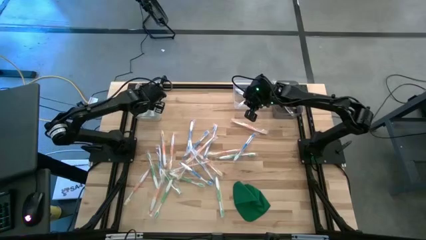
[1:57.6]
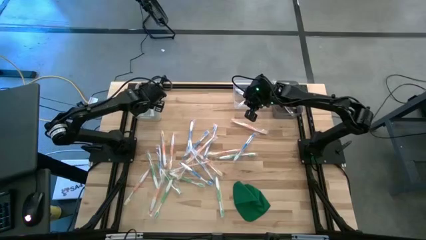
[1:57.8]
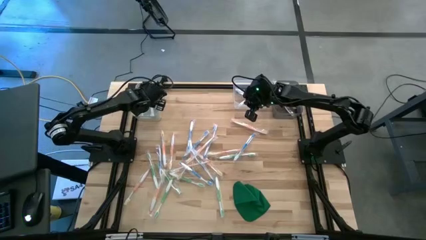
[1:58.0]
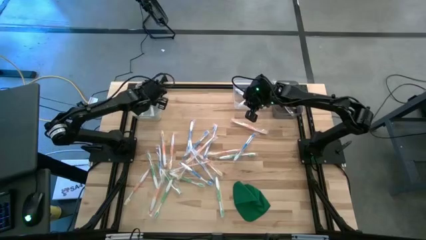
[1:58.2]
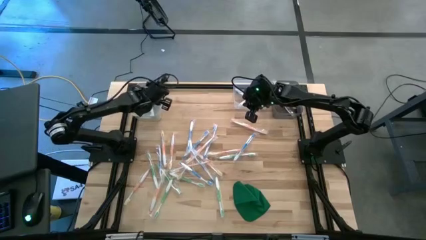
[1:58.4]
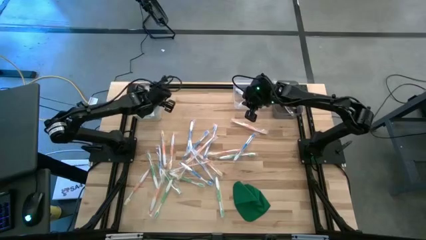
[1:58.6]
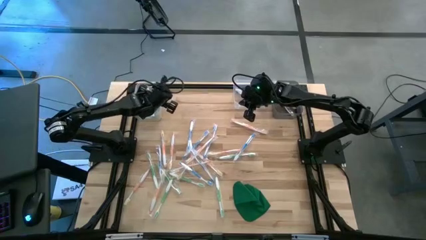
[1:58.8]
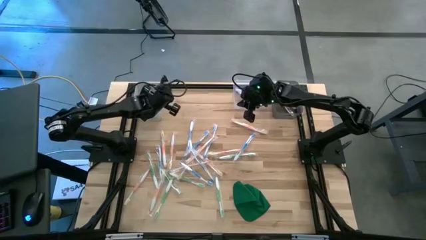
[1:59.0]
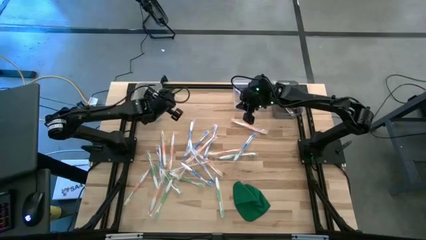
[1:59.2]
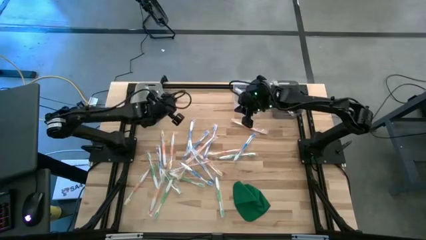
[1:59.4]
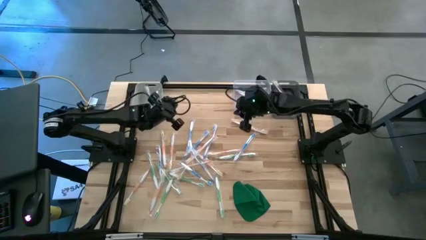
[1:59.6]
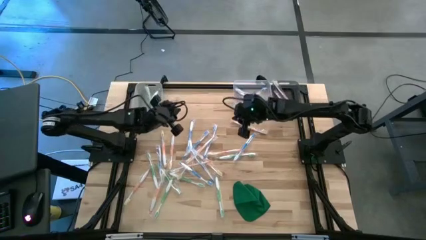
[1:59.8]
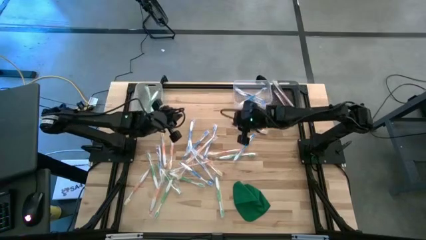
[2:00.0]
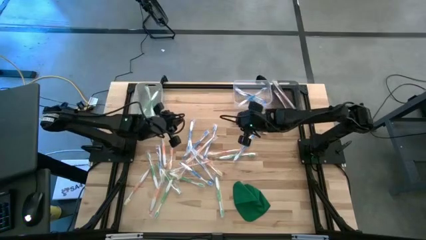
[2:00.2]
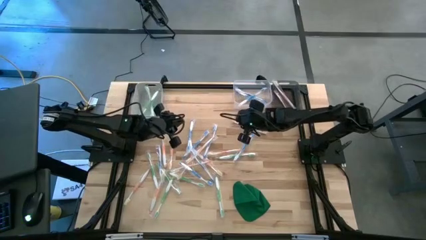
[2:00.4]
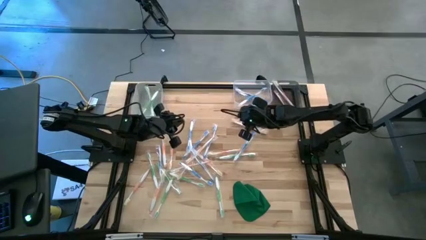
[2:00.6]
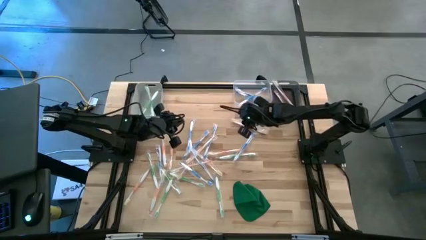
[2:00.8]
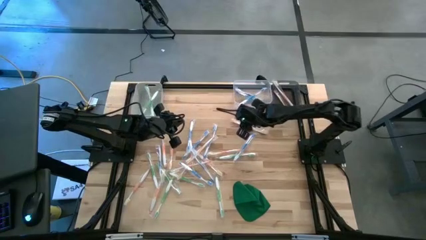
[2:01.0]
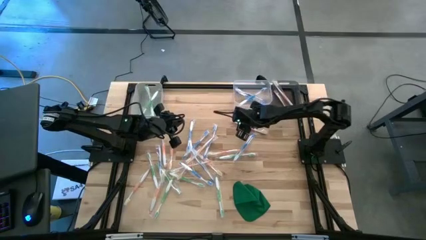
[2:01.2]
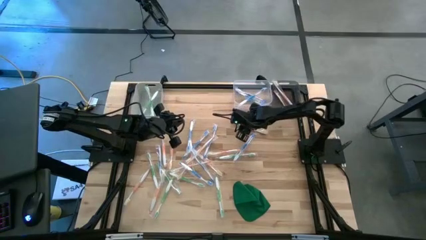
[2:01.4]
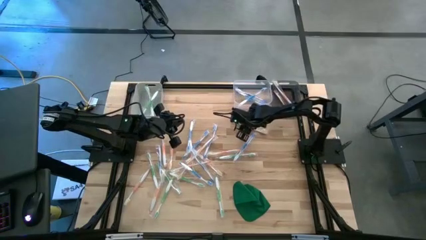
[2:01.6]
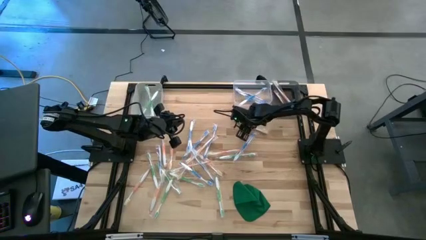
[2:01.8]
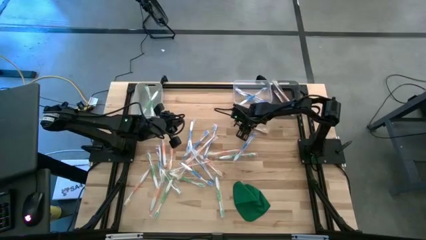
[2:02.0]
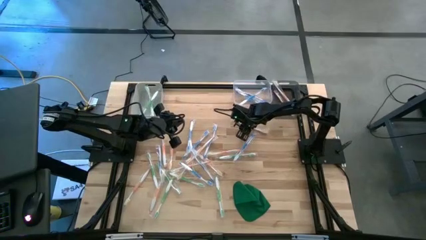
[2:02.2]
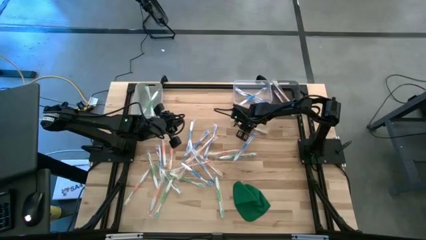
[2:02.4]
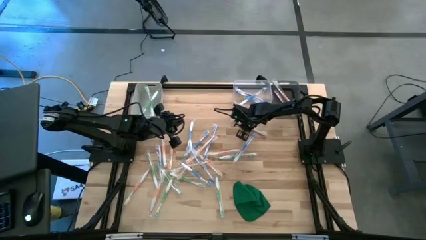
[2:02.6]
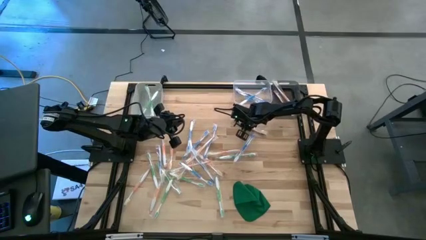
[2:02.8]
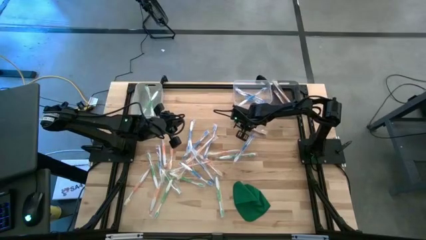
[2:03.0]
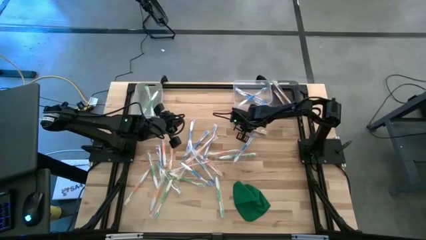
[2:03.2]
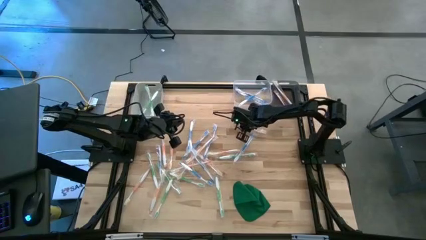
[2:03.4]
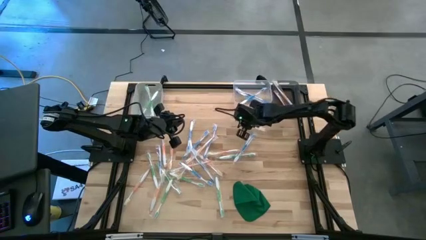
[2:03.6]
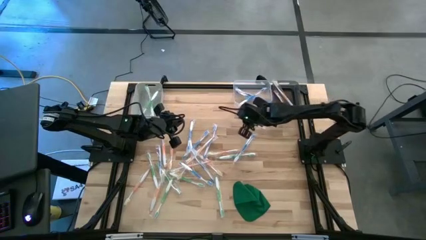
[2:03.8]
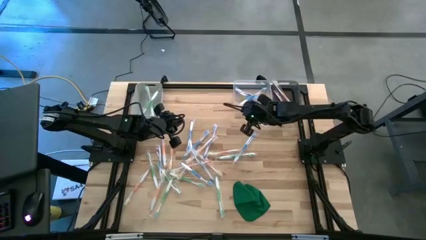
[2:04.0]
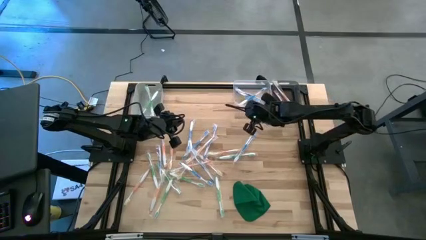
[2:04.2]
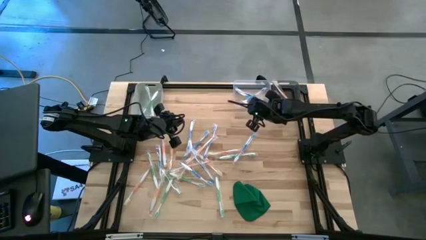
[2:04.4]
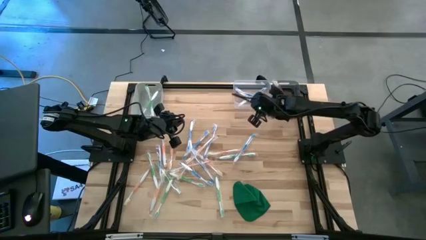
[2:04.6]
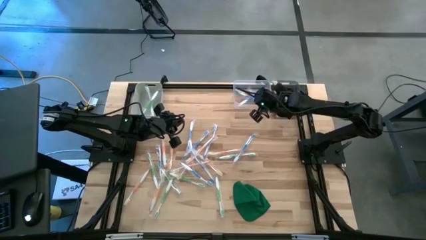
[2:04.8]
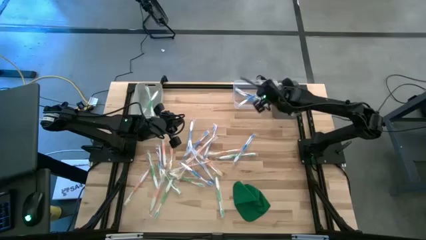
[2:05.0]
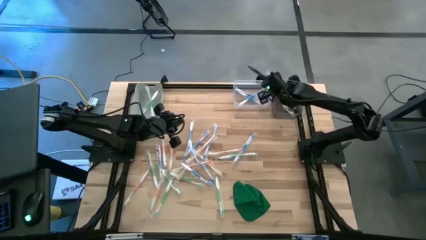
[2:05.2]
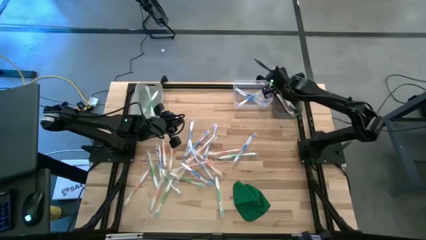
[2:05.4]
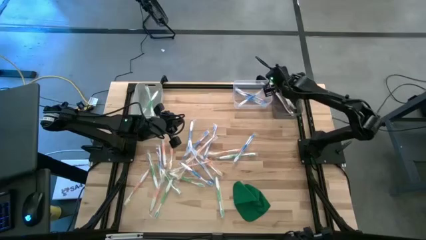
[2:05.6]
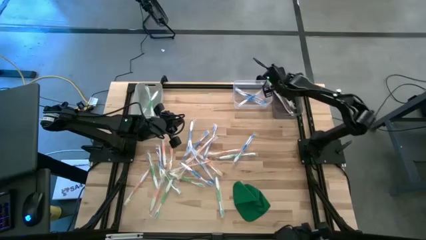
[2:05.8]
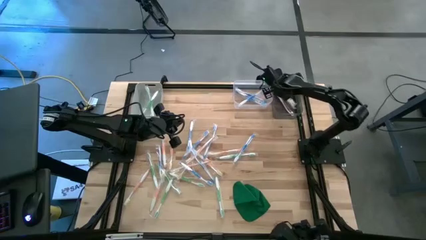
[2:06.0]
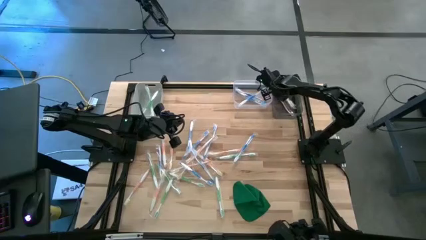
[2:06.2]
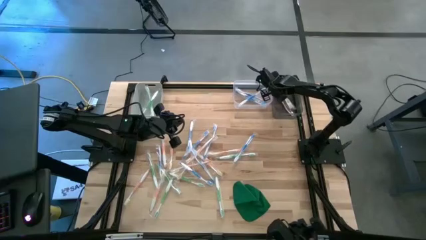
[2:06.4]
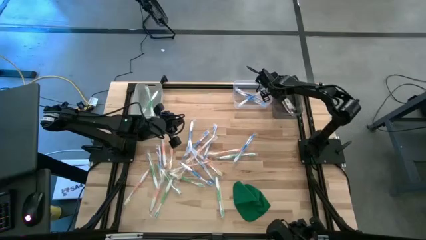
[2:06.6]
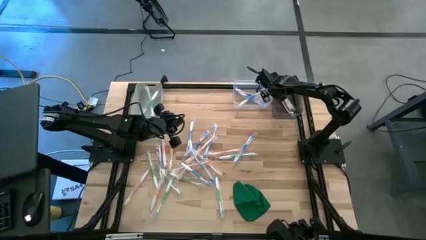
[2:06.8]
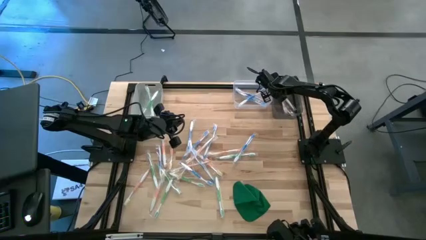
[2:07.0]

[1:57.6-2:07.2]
Task: Pick & Place Toothbrushes
Put the orange toothbrush into the black bin

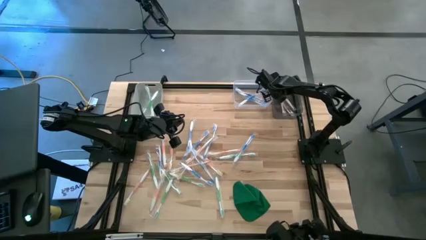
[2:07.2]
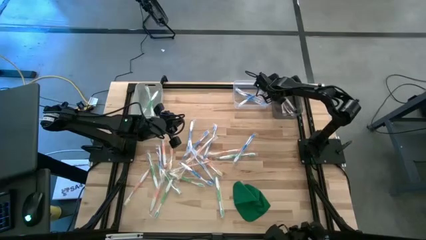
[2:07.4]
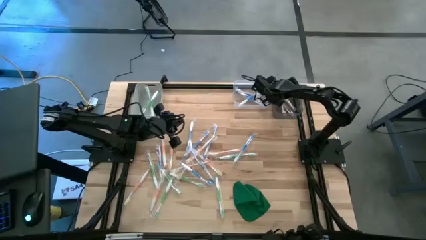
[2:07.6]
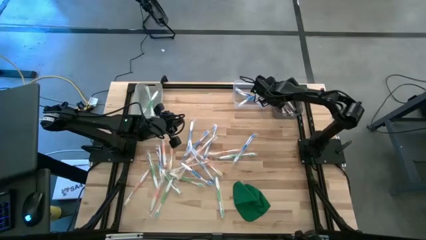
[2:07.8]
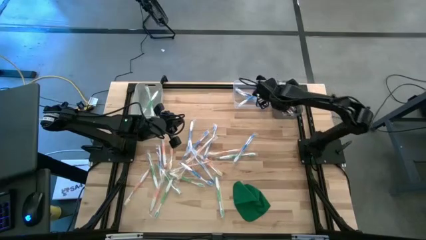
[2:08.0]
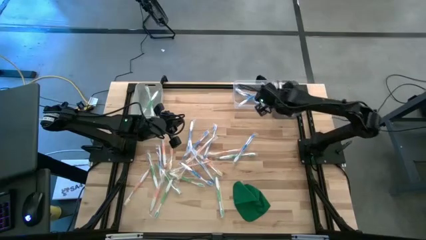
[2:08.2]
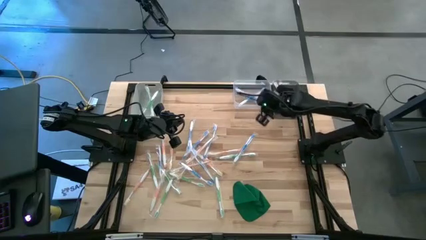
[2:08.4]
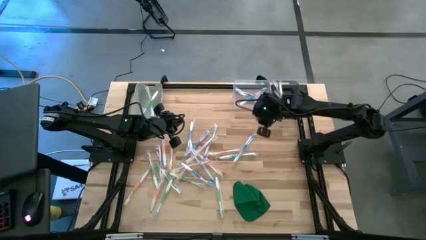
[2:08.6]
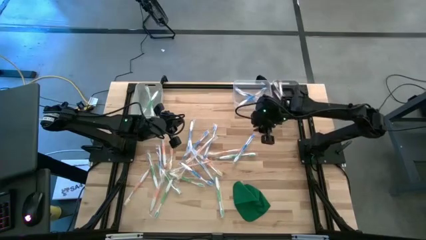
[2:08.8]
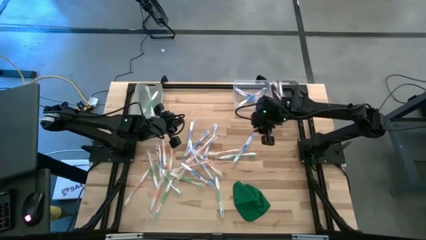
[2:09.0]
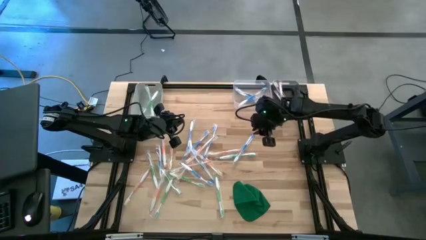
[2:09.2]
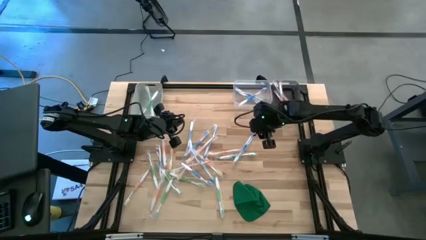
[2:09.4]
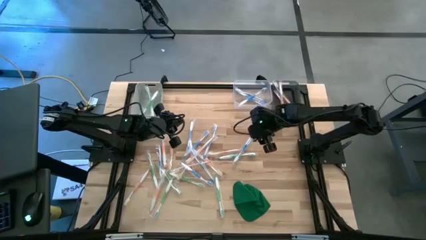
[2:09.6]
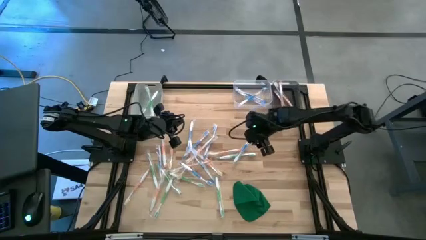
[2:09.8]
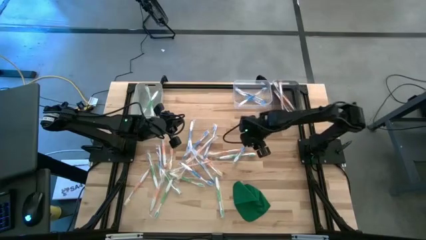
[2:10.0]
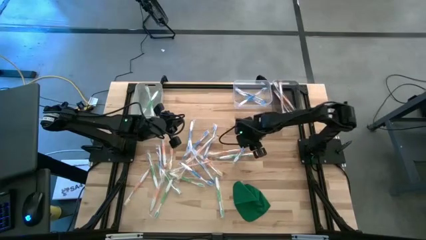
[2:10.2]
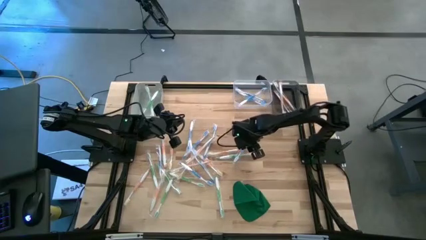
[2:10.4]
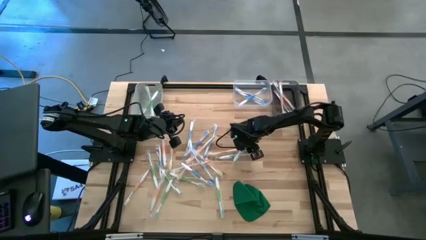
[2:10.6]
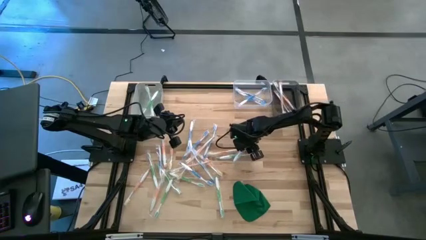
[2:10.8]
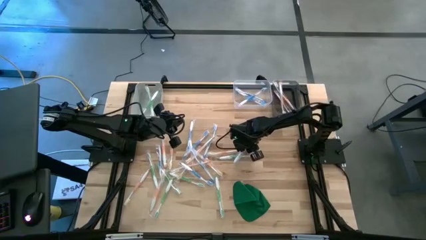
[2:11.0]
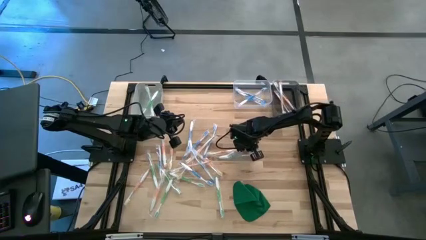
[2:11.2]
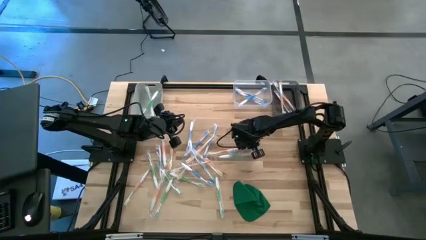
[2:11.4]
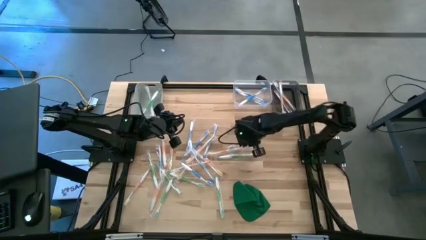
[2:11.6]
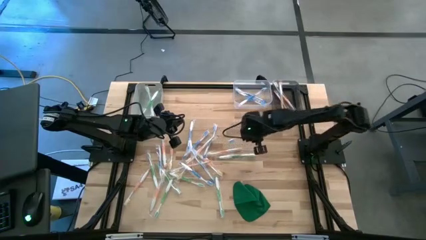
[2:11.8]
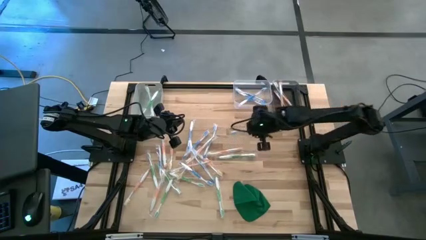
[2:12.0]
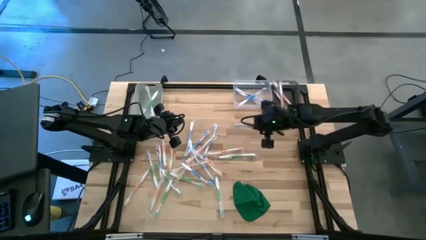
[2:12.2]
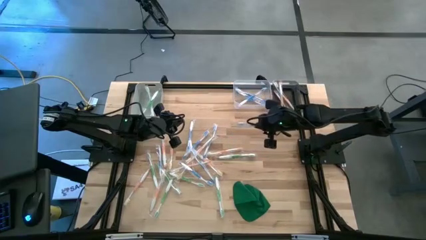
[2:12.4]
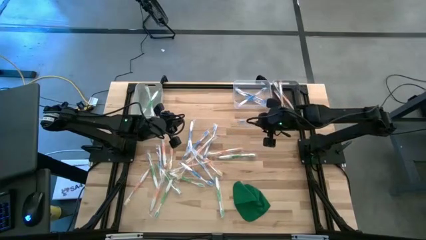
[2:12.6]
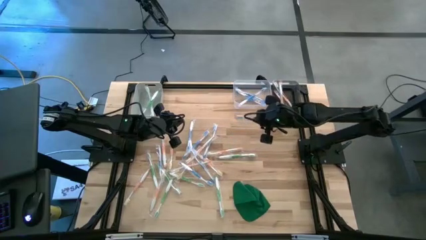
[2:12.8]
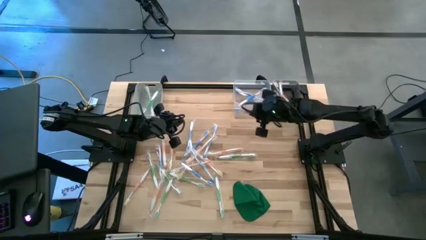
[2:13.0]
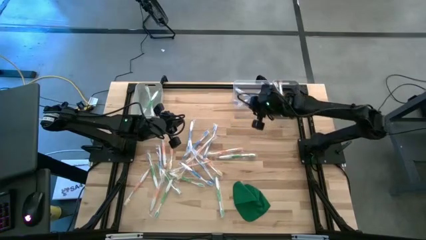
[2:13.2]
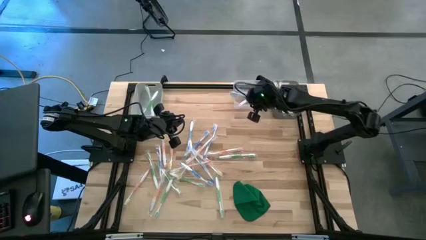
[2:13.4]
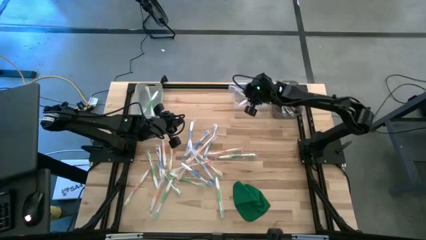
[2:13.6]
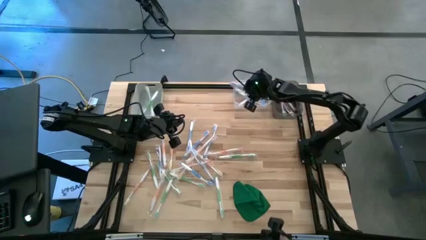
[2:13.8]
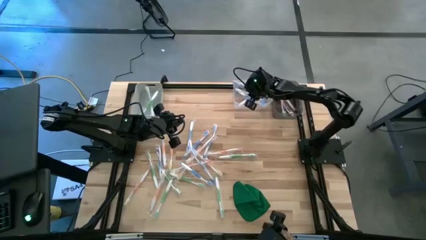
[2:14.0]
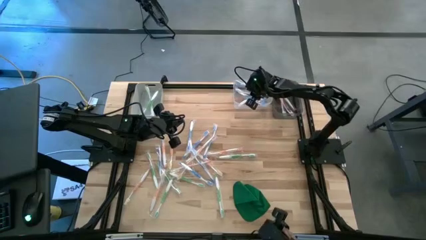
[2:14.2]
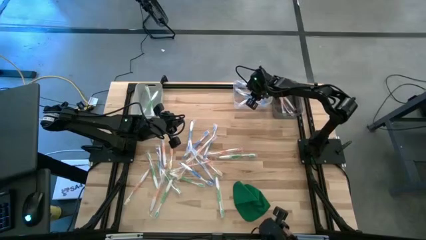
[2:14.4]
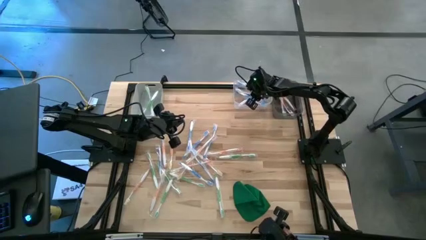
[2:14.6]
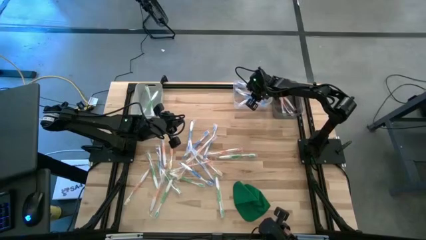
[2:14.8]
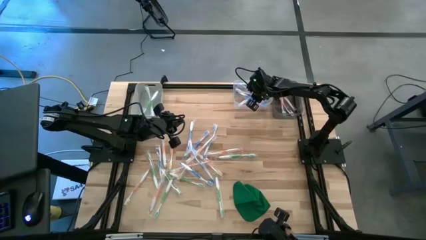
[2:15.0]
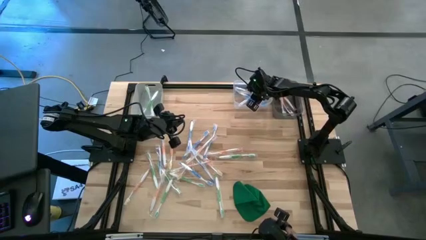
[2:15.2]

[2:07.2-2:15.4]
Put the blue toothbrush into the transparent bin
